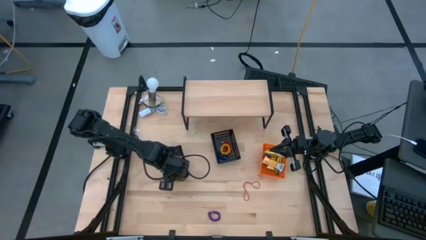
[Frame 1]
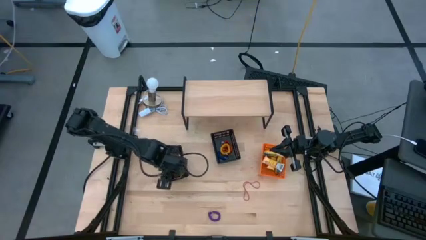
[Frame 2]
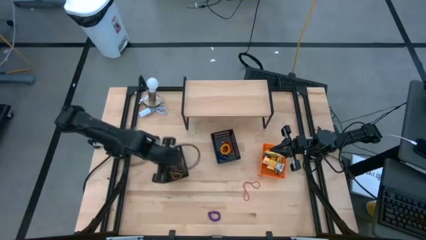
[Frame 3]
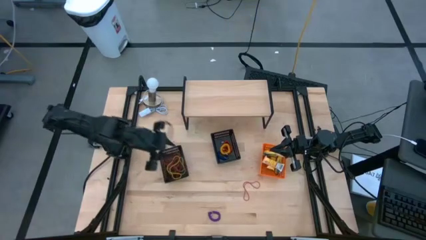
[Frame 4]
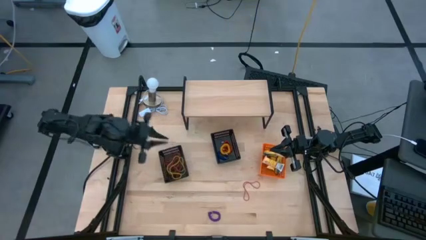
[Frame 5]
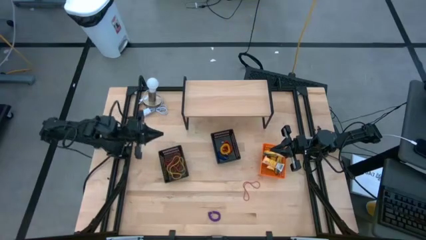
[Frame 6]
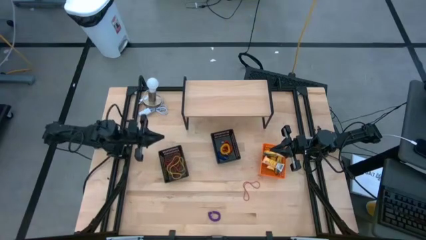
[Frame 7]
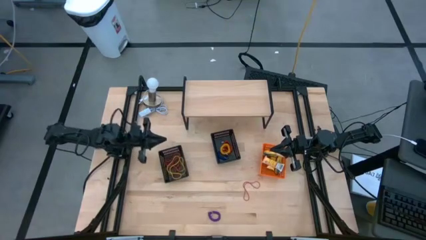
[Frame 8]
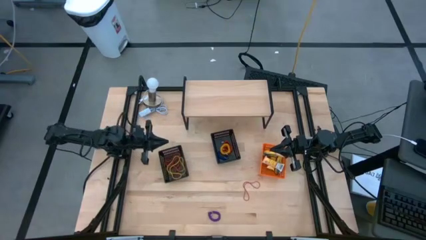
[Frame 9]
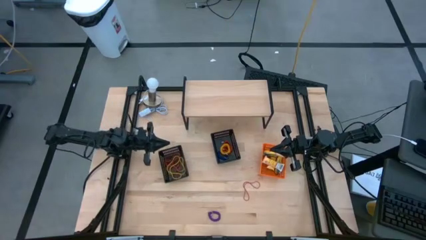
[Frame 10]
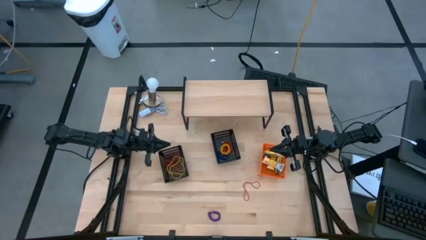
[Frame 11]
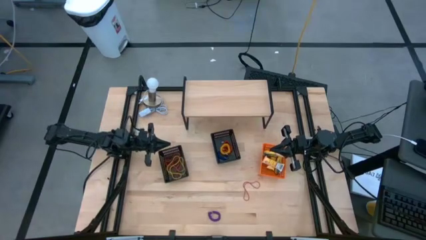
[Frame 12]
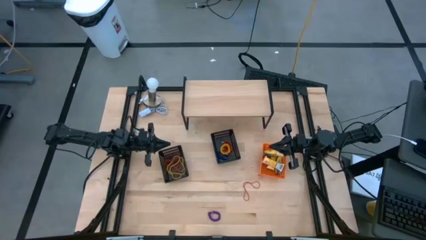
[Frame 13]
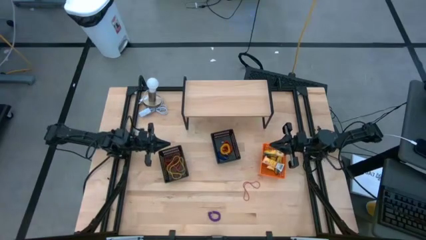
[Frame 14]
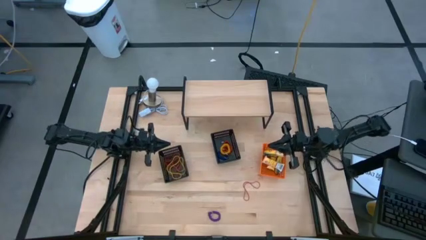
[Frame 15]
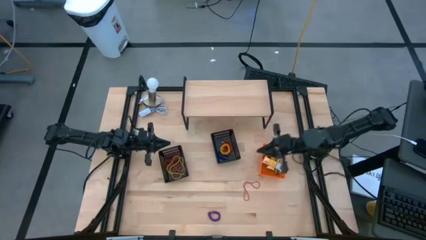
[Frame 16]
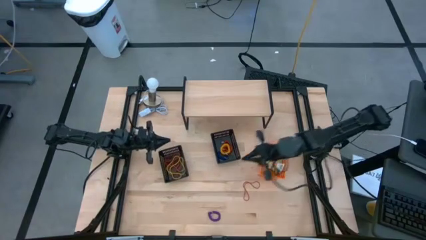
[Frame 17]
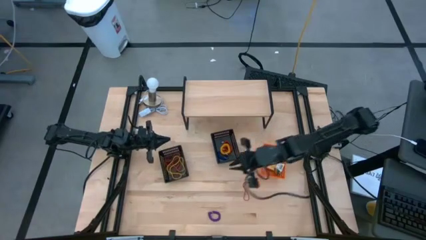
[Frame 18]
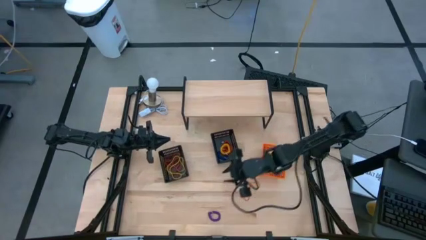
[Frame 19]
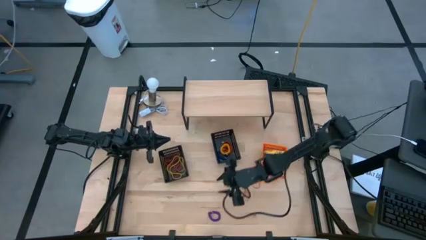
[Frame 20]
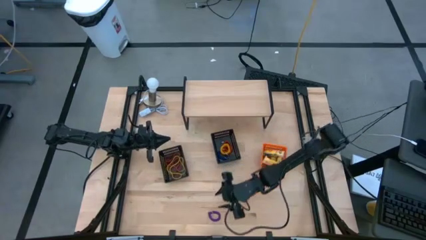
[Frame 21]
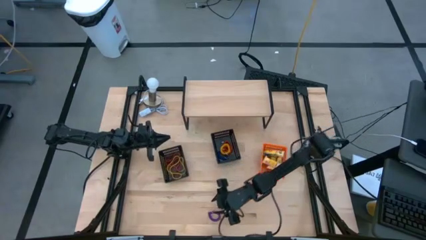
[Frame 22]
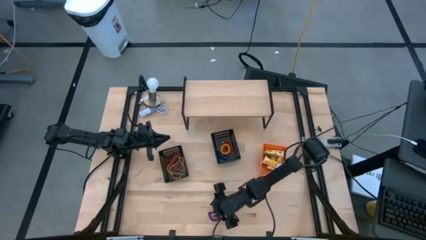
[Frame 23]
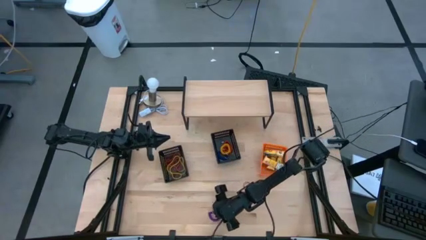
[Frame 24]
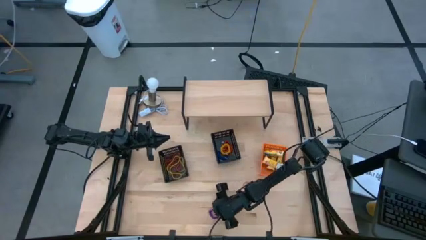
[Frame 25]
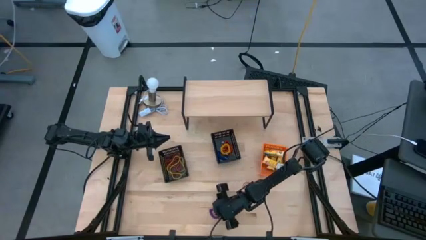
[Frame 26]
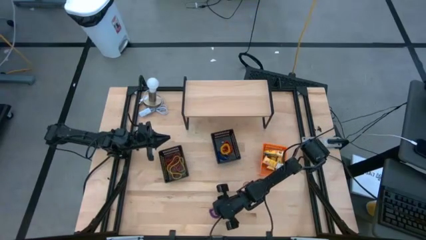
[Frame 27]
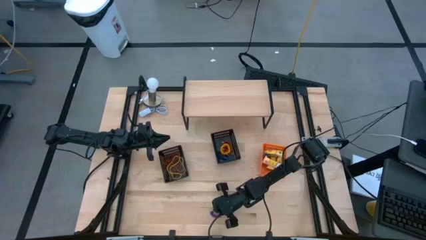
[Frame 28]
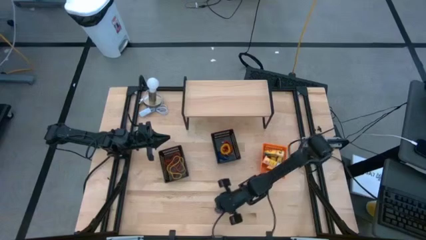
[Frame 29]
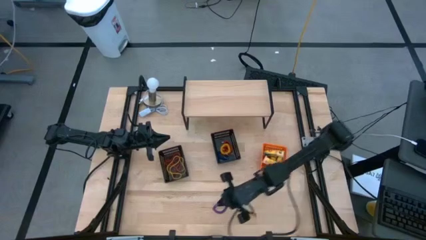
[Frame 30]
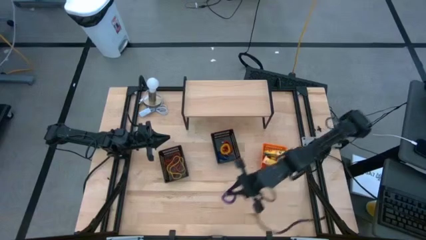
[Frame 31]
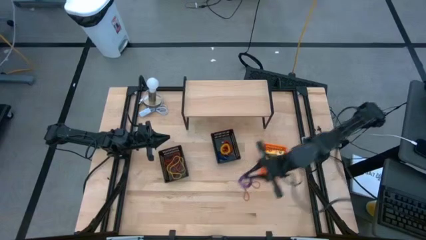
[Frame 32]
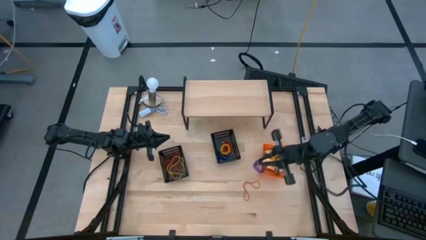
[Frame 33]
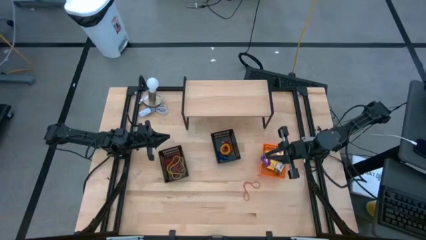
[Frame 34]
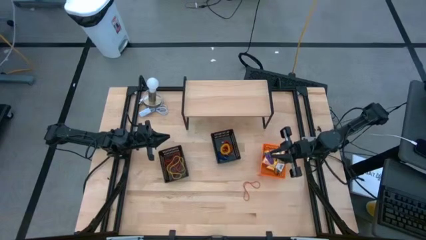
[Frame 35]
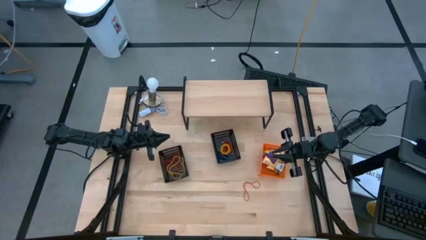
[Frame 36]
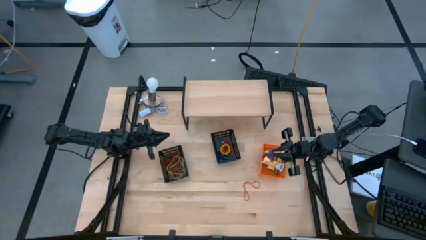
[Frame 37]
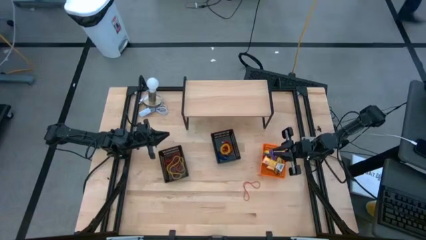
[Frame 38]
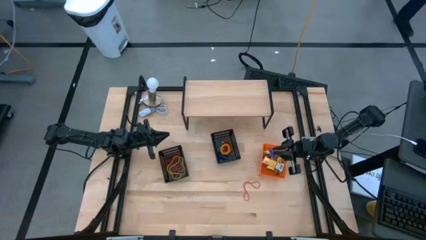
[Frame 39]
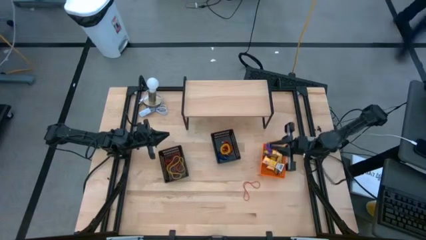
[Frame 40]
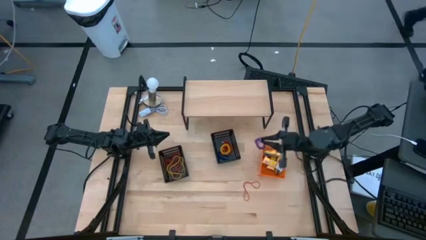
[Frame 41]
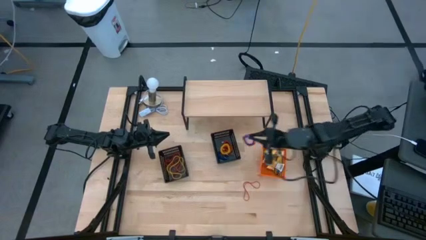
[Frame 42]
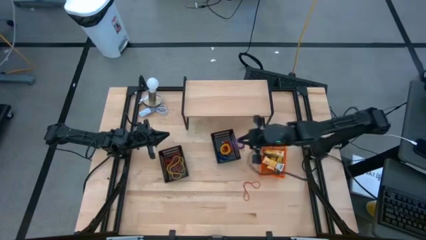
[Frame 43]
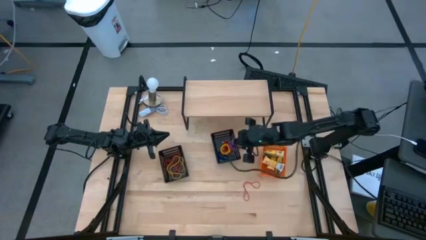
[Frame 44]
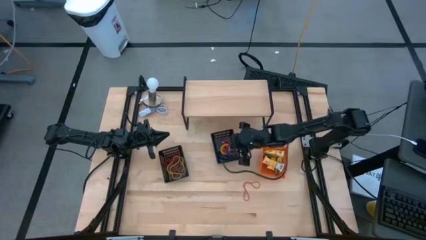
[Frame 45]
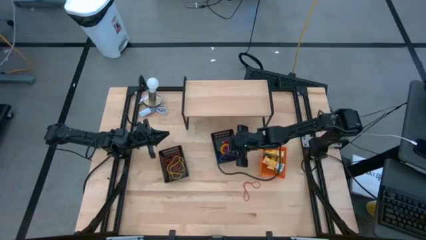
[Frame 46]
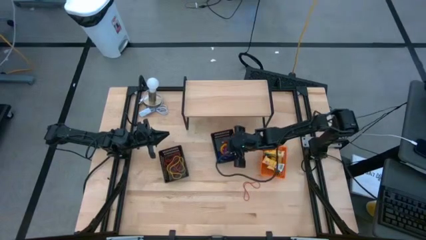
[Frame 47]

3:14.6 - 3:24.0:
Task: Pick & Place Office Desk Supplies
Put the purple spring rubberband into the right black

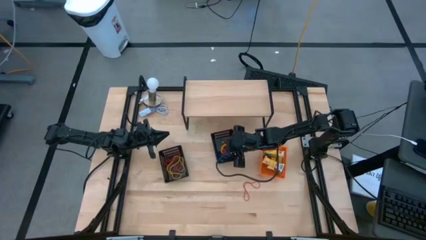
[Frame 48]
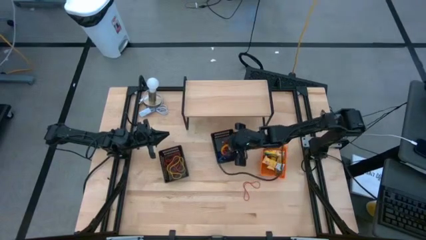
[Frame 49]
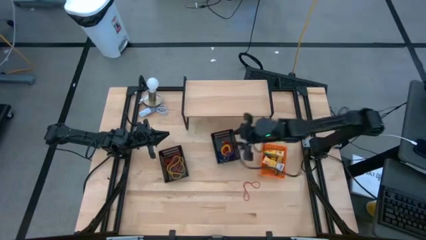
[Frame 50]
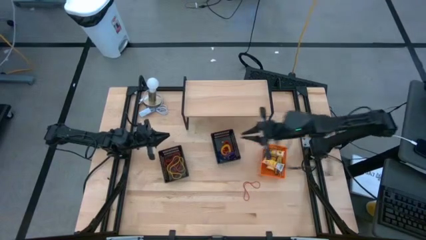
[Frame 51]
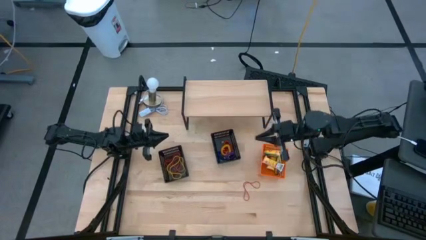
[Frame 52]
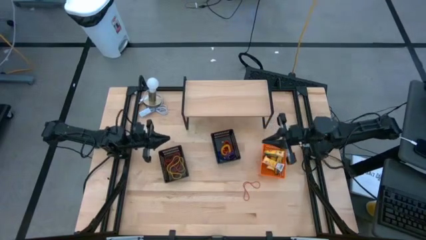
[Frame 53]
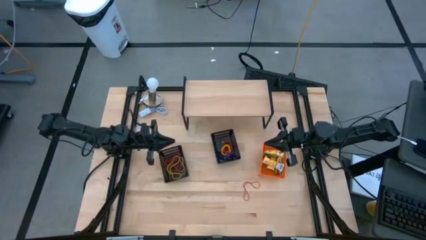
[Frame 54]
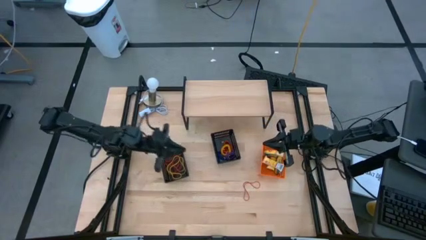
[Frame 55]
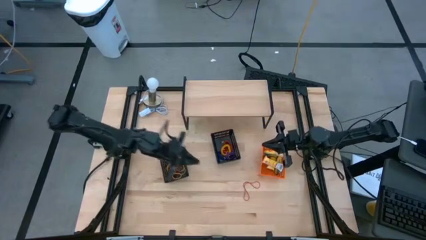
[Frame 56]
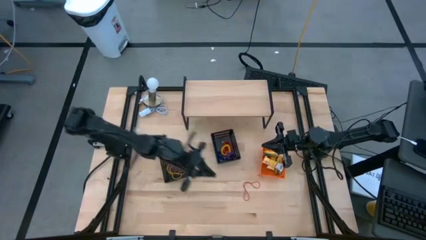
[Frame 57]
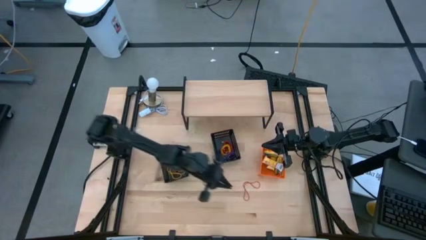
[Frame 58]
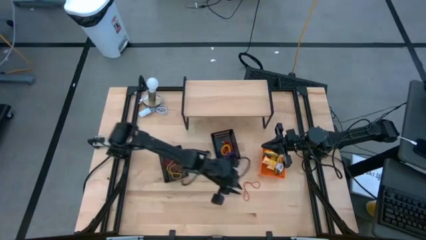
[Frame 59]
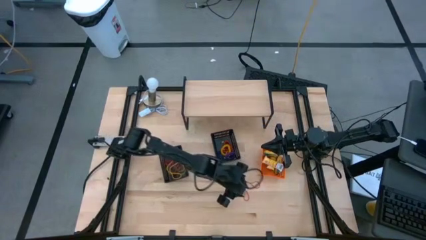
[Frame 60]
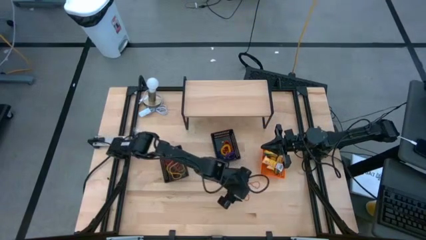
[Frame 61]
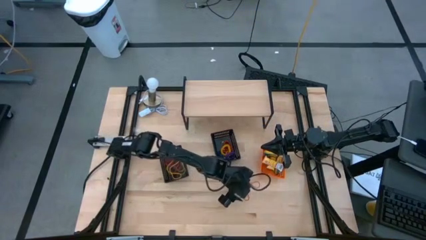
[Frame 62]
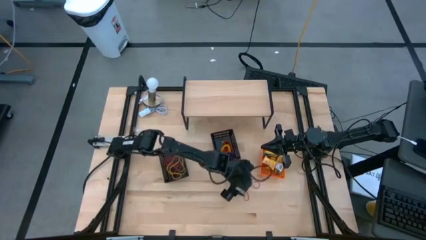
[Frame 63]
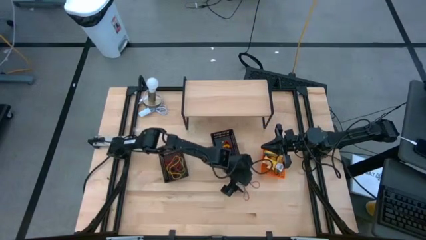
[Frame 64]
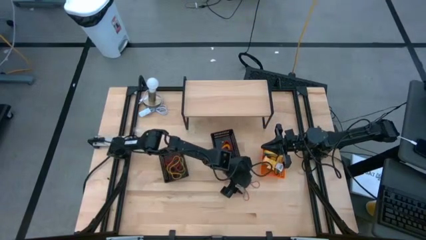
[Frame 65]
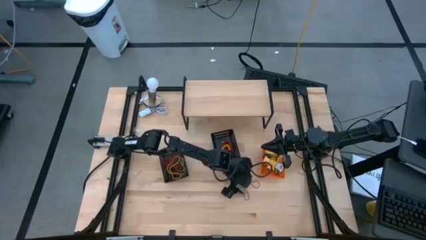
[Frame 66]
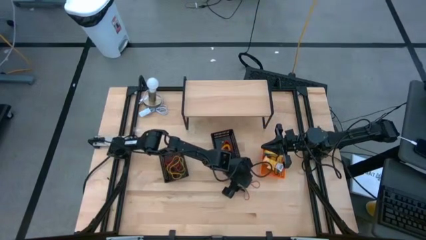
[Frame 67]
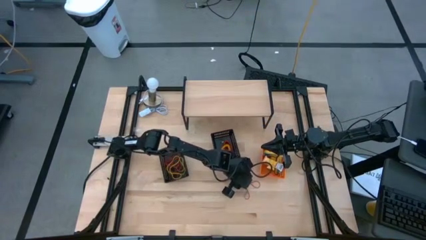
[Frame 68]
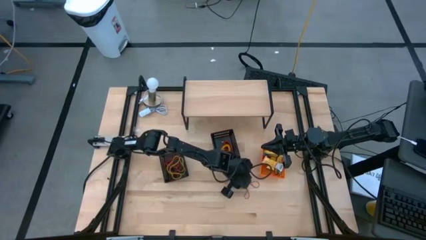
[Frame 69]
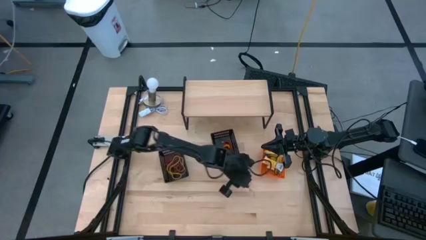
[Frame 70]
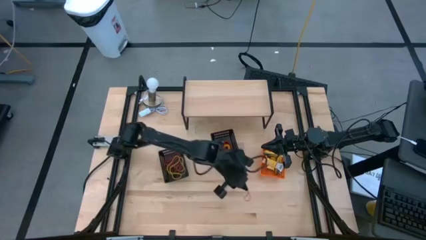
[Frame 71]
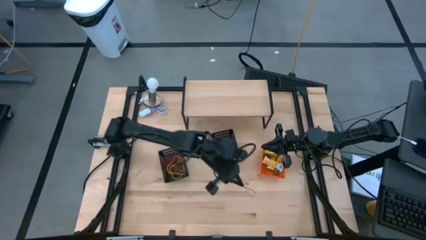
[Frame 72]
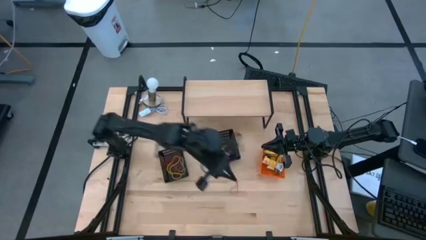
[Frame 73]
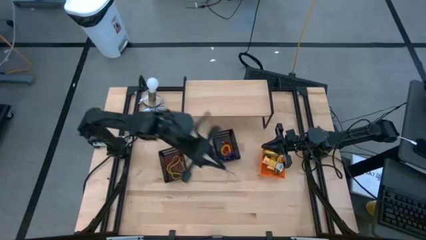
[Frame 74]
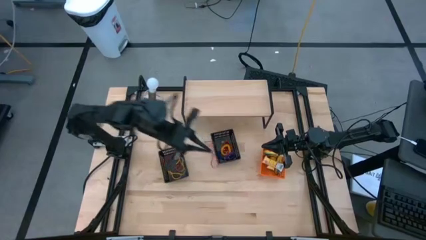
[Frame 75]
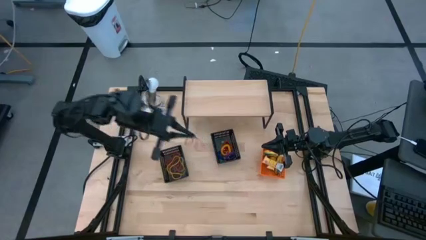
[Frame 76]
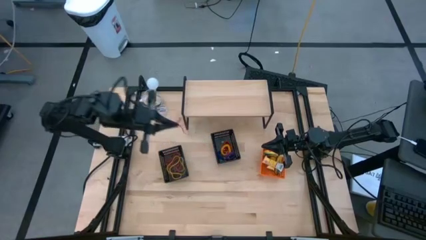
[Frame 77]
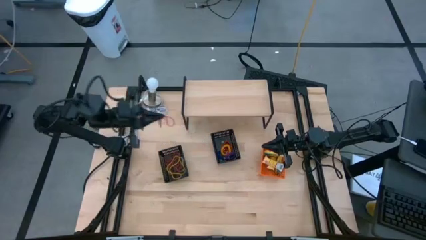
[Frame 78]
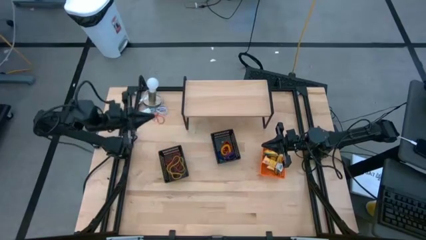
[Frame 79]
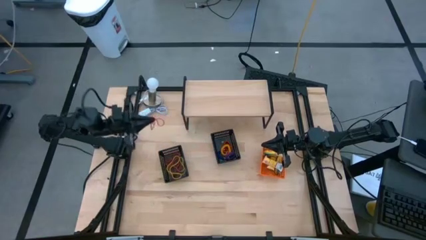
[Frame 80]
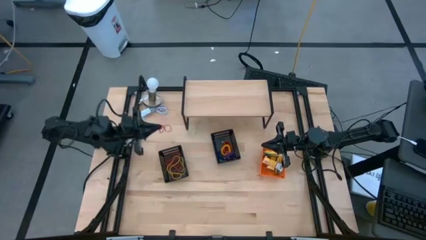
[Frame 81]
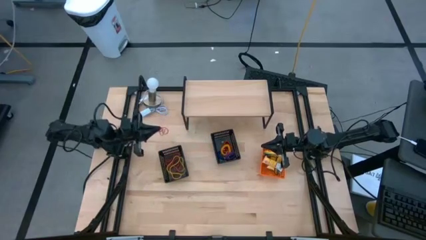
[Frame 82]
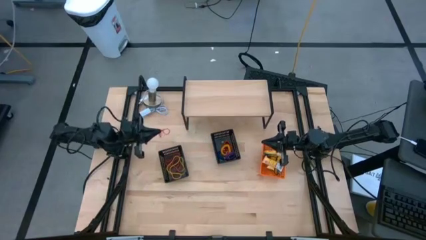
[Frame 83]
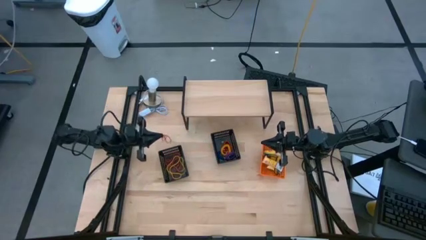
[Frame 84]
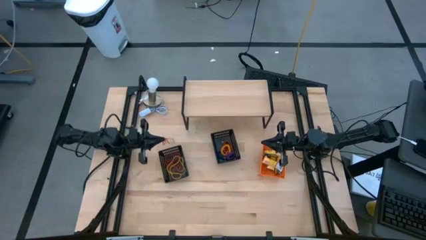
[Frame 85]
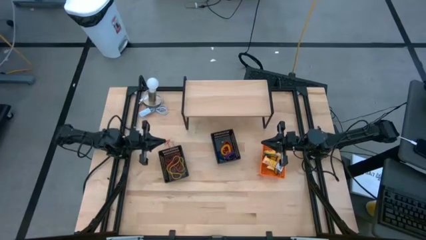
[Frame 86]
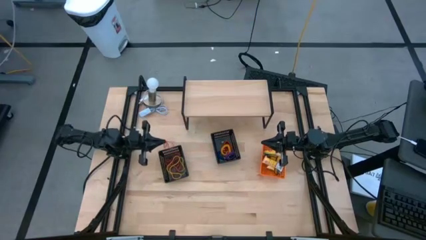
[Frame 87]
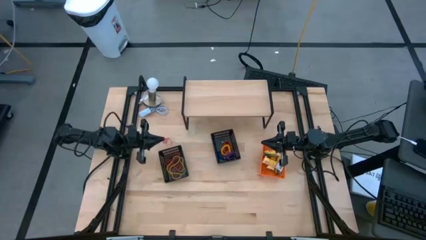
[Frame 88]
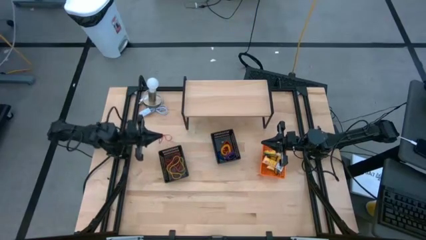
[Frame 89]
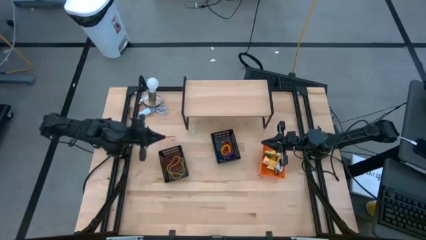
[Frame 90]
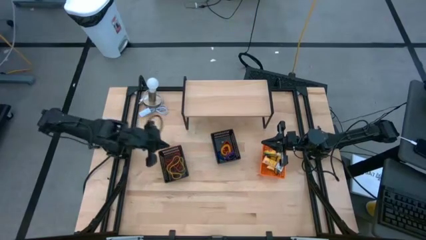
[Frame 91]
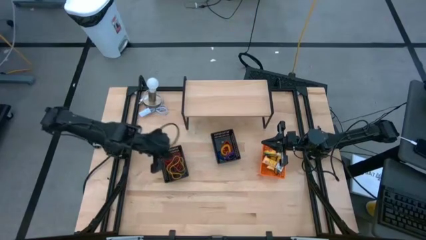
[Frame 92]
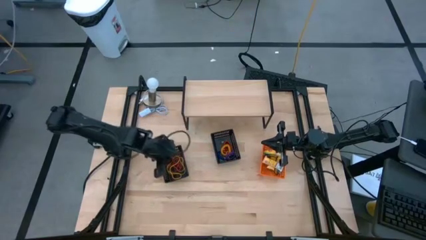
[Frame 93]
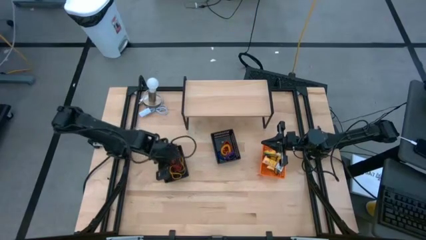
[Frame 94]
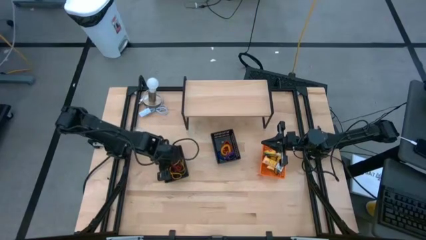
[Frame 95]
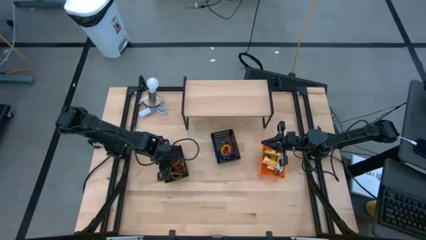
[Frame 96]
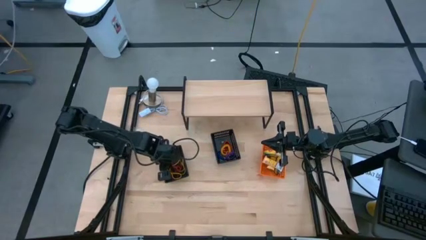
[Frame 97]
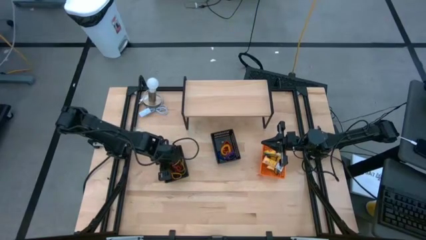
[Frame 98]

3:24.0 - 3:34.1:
Put the red rubber band into the left black bin
